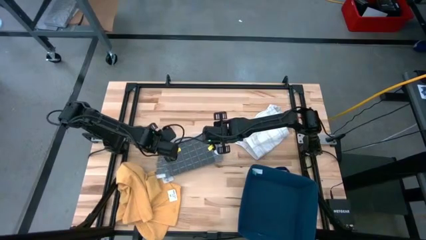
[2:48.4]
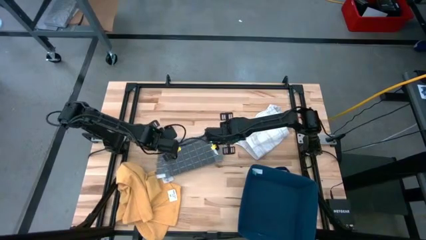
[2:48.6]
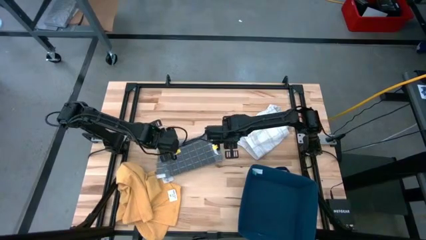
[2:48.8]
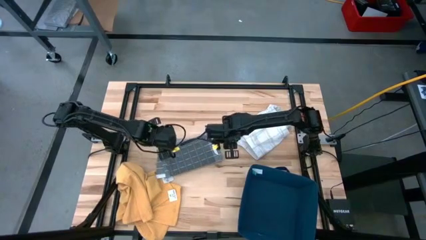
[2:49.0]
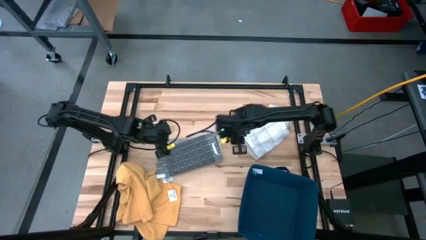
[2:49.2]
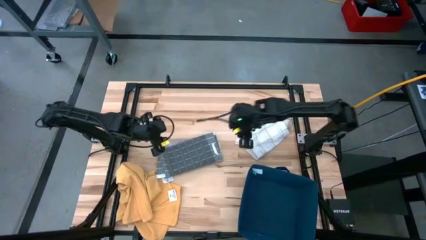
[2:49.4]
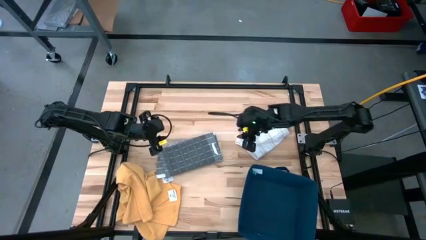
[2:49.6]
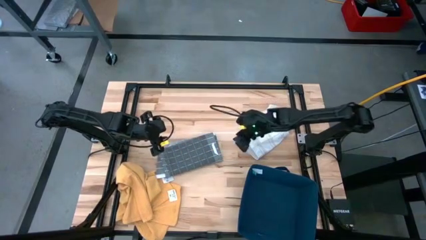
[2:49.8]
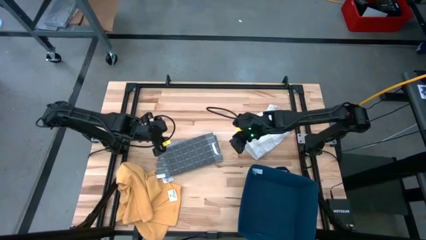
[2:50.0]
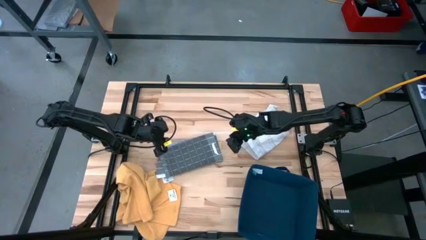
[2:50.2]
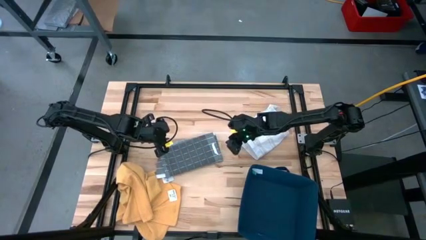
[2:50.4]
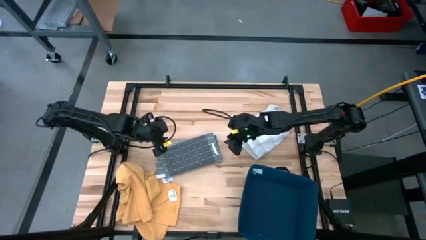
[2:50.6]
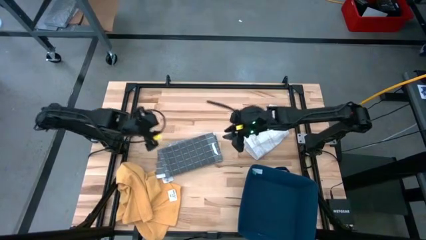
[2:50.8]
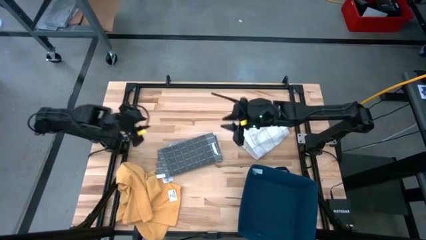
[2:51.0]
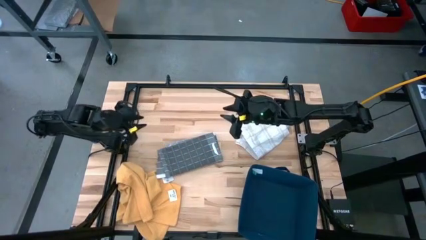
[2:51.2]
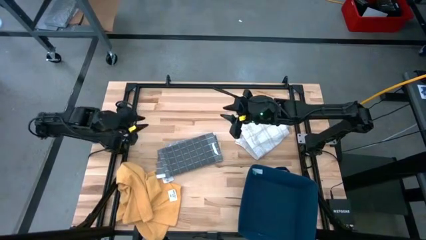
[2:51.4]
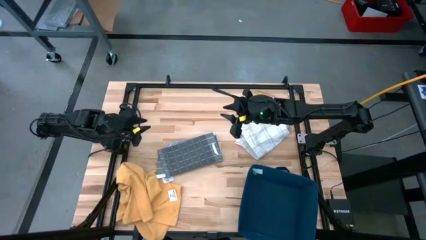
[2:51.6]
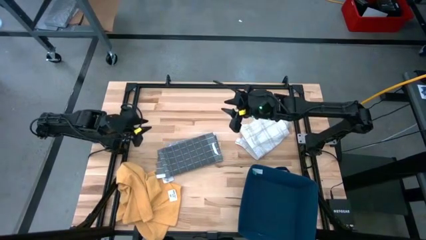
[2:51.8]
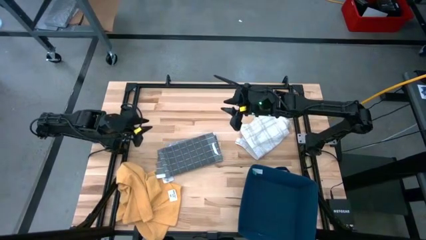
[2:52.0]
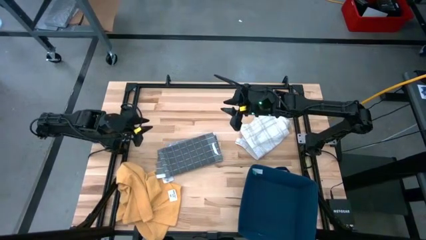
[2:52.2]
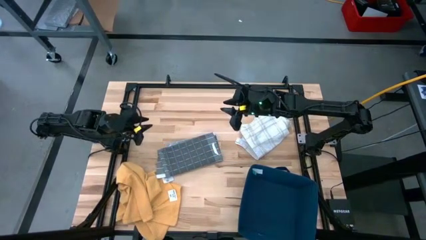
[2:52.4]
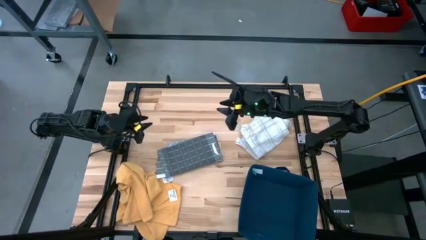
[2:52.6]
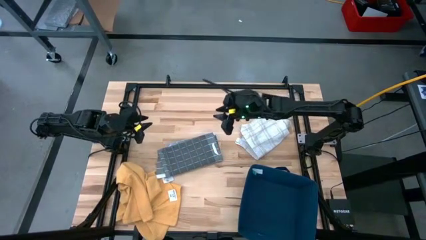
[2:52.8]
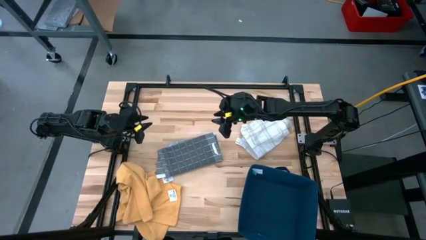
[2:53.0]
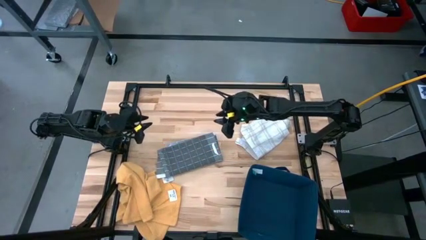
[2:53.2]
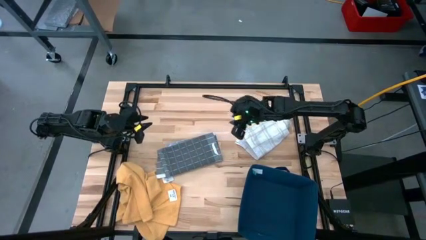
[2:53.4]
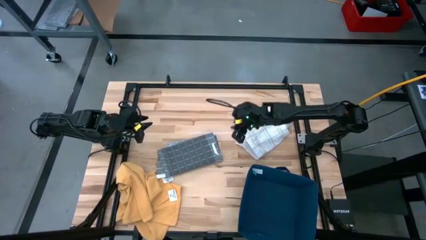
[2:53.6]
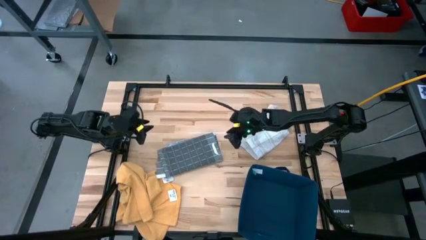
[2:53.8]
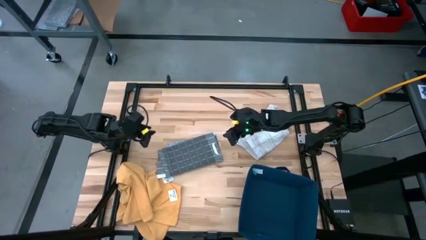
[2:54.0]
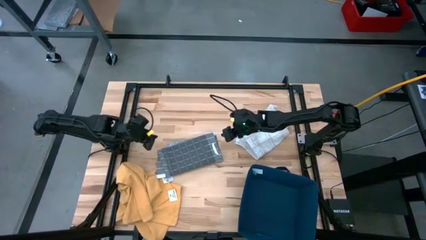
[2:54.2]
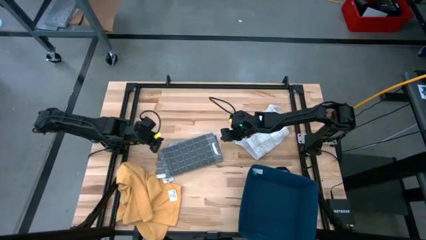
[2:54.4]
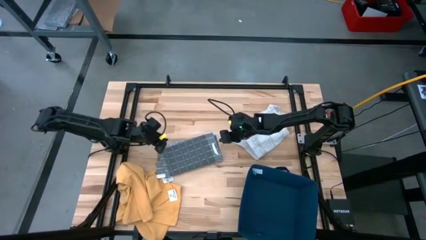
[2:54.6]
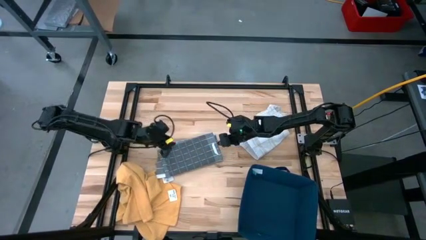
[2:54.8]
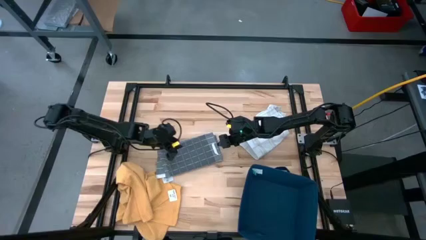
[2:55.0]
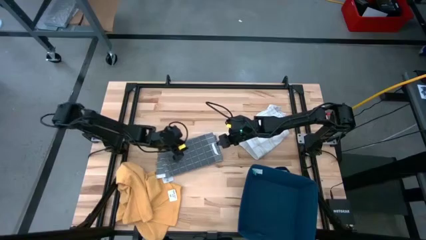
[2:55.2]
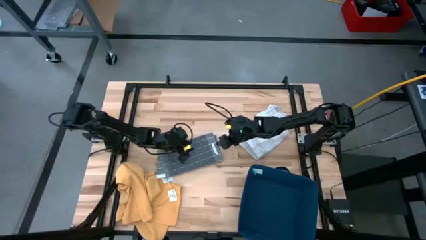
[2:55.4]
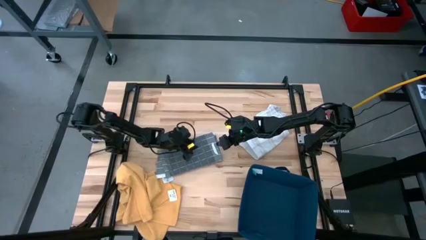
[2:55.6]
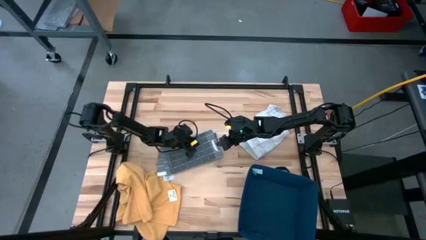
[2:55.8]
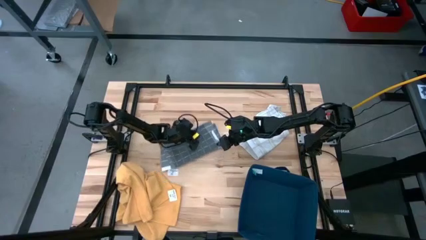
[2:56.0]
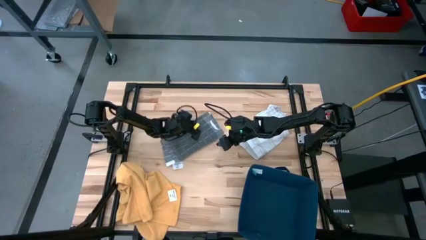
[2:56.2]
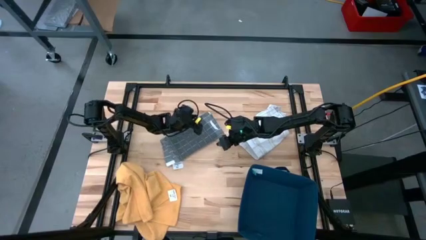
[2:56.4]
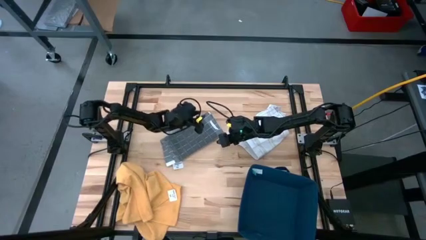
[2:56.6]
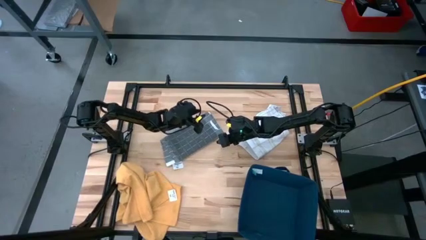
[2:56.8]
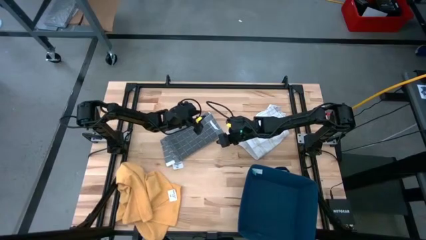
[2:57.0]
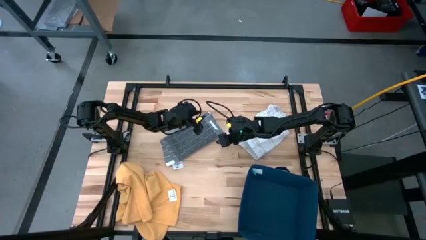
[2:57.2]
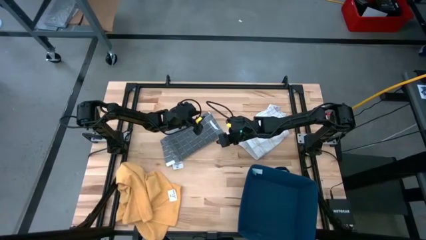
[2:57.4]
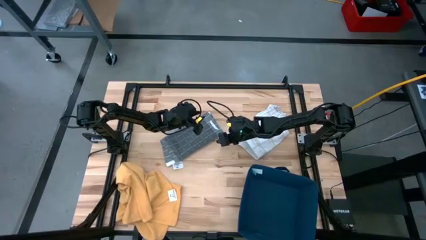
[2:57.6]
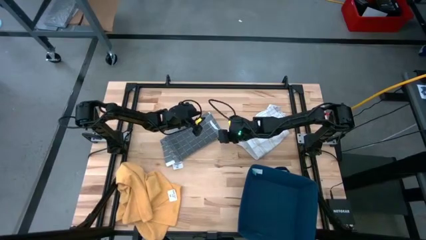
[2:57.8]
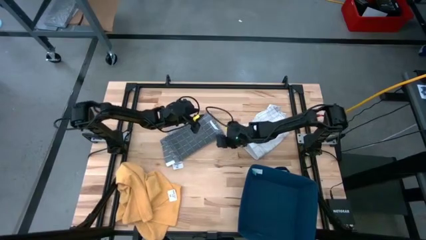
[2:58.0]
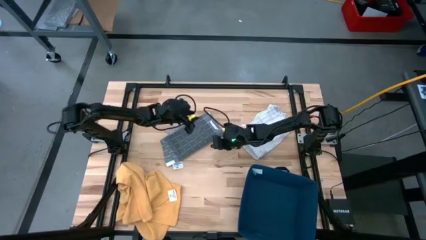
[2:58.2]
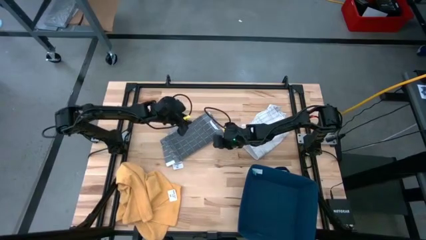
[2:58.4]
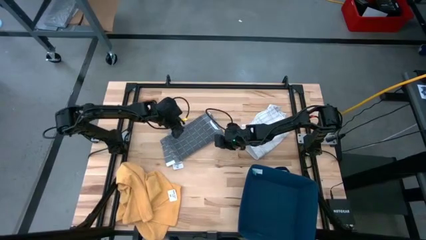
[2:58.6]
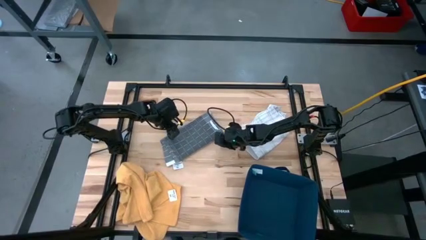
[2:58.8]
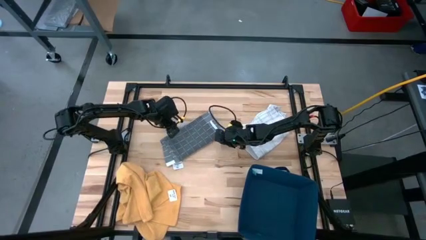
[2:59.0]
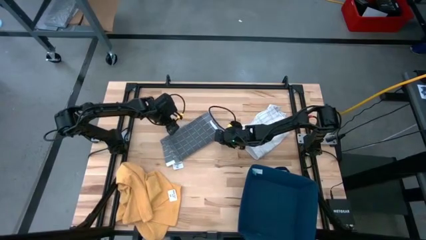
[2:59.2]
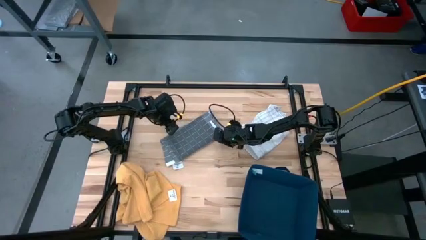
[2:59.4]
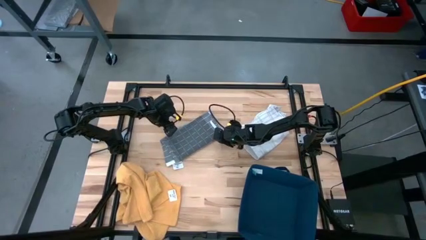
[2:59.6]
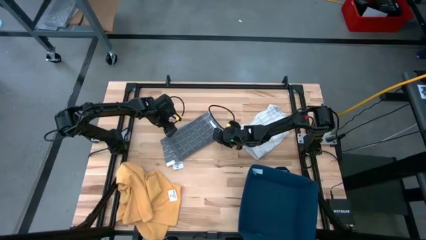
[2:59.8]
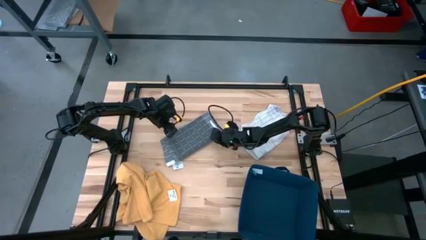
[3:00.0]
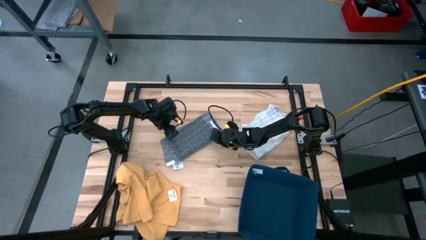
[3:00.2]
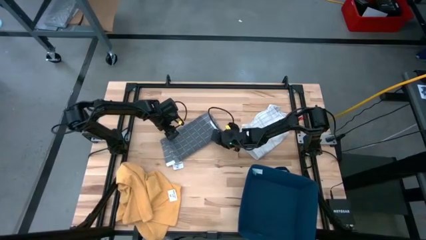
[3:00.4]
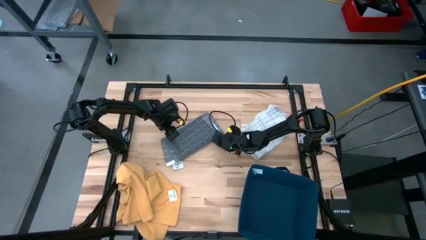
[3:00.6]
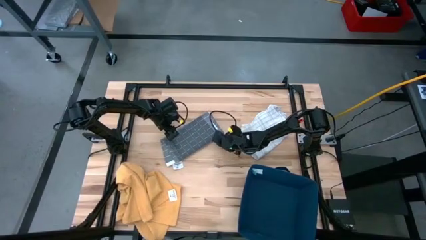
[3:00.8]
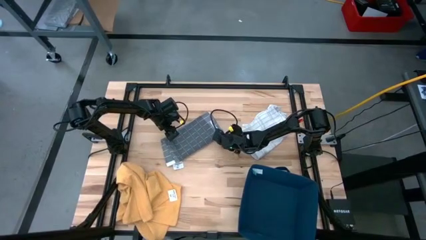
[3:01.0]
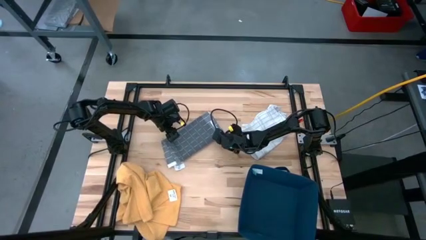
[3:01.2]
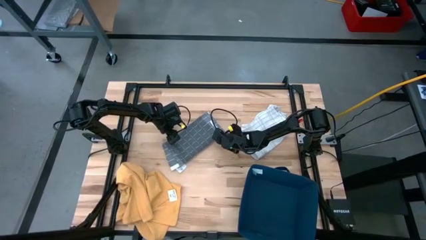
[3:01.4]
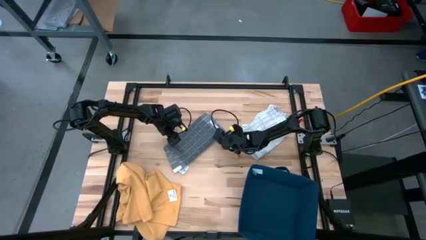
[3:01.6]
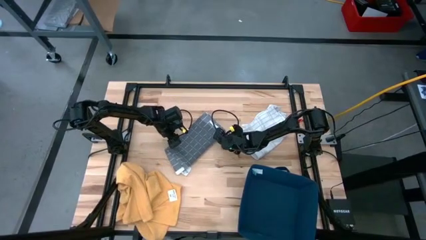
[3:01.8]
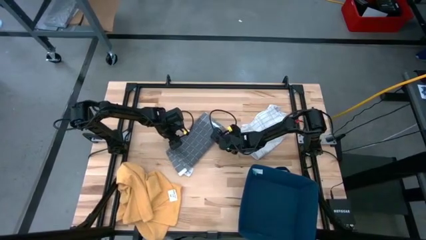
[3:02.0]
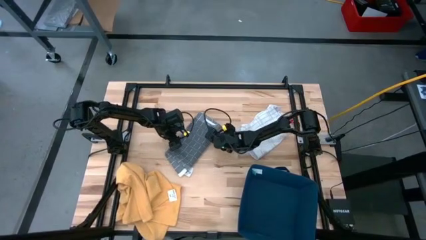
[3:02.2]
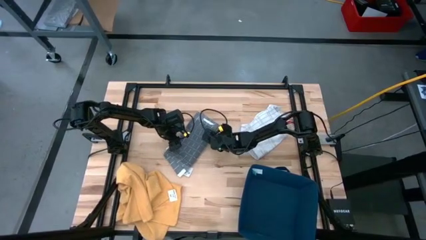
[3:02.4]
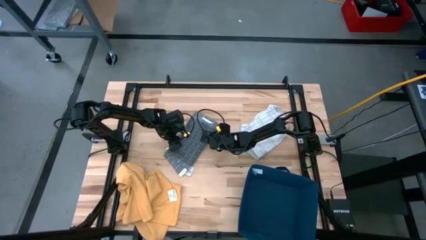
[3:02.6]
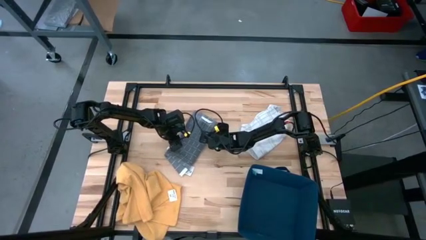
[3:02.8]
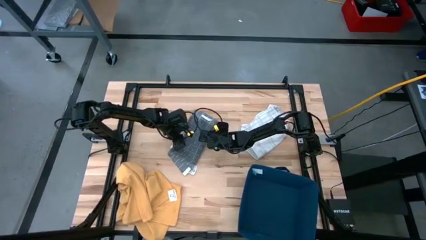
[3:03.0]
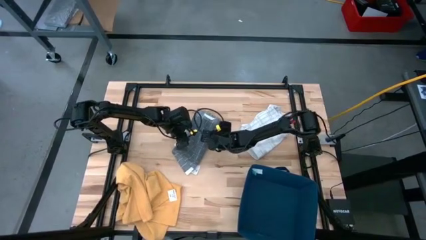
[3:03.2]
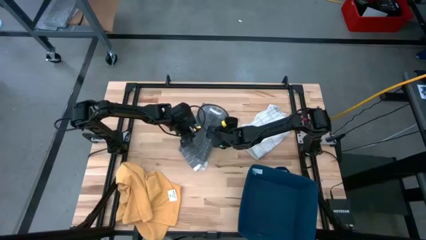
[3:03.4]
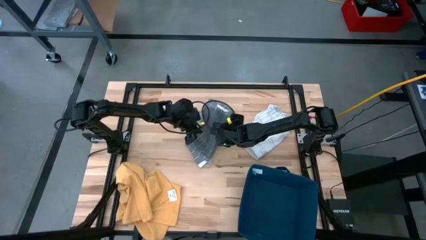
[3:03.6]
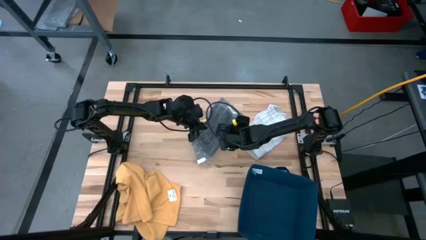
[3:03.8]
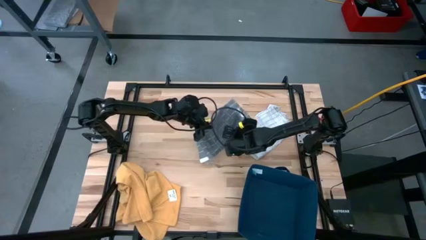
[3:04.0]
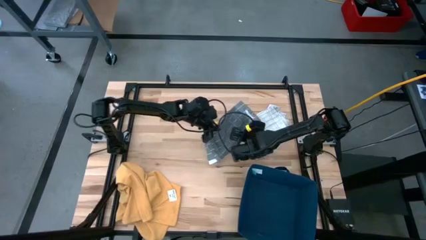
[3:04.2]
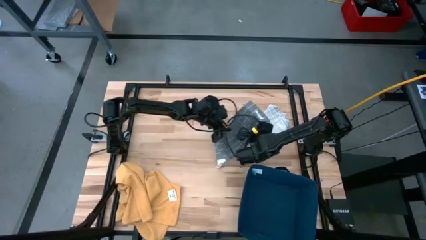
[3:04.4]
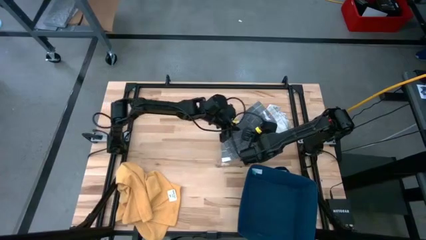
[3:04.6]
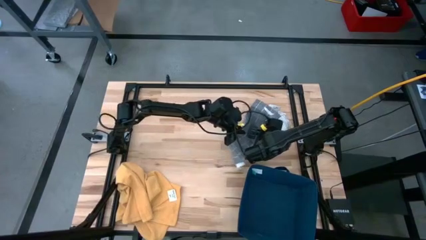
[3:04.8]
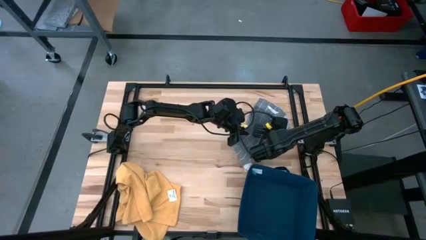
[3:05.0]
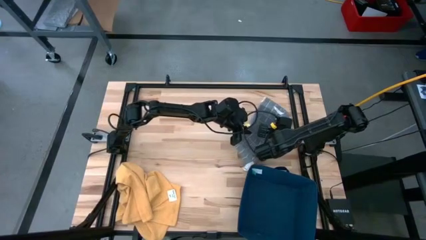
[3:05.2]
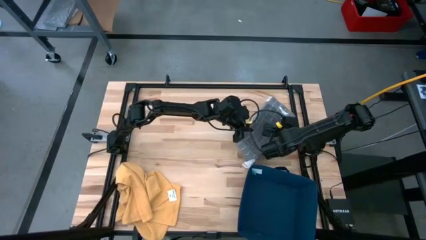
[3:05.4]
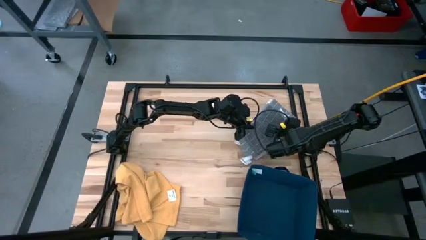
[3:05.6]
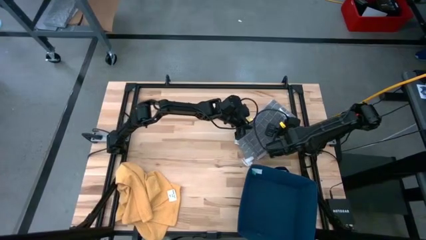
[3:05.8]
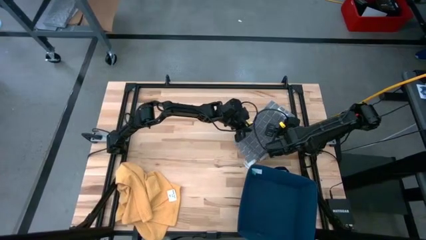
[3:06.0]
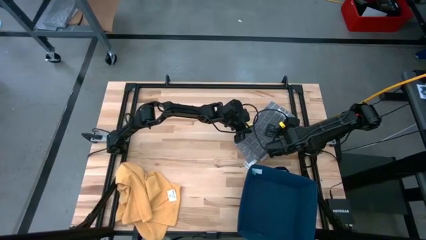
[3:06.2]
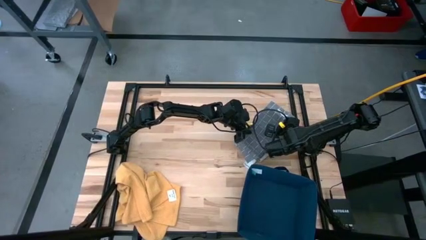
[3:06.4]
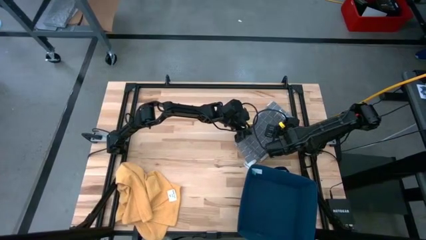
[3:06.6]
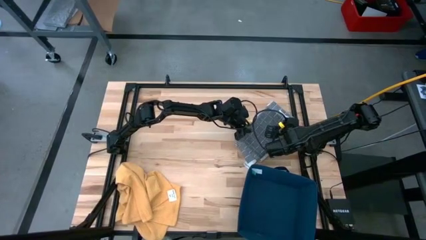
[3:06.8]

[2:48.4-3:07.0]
Task: Fold towel
Stack the gray kitchen towel onto the white kitchen towel
